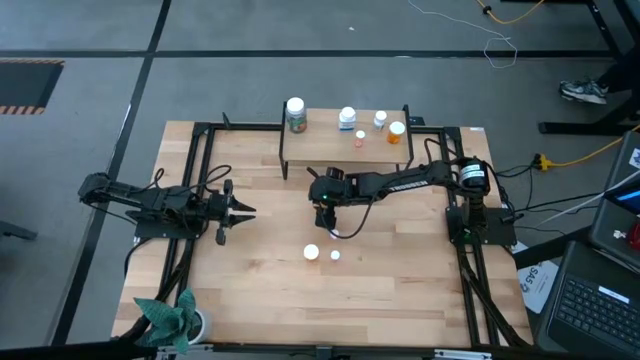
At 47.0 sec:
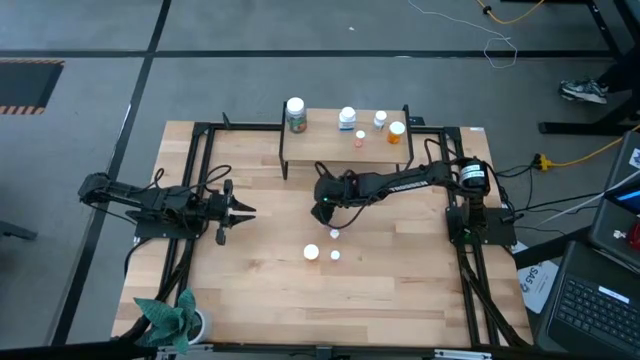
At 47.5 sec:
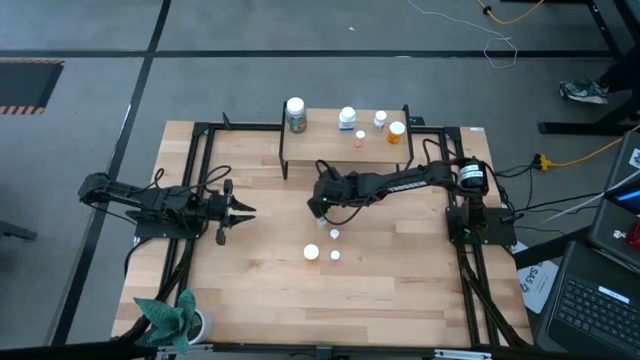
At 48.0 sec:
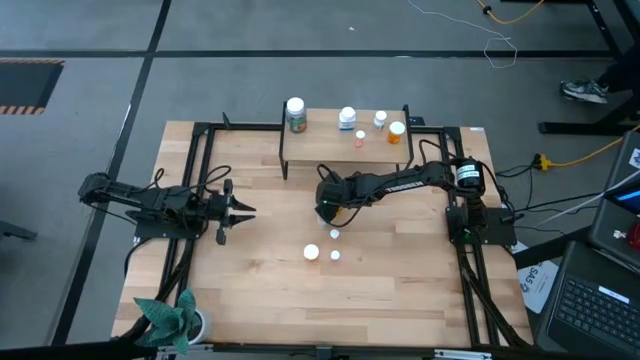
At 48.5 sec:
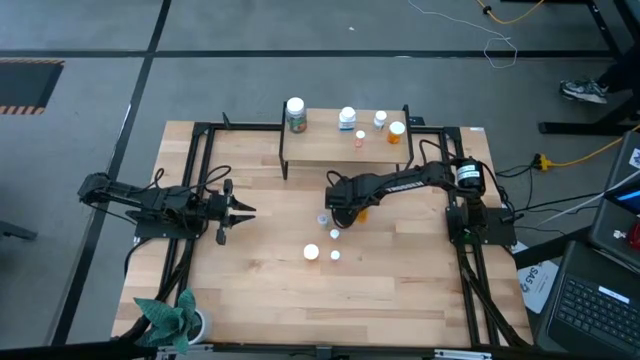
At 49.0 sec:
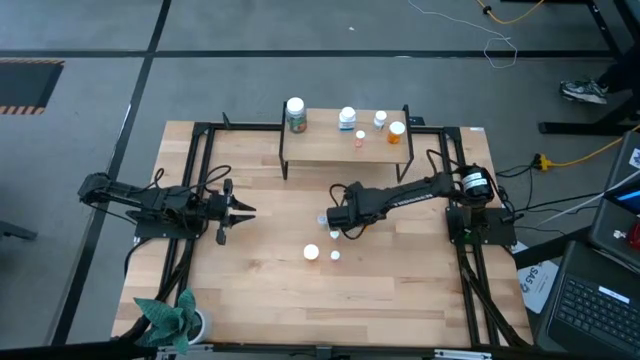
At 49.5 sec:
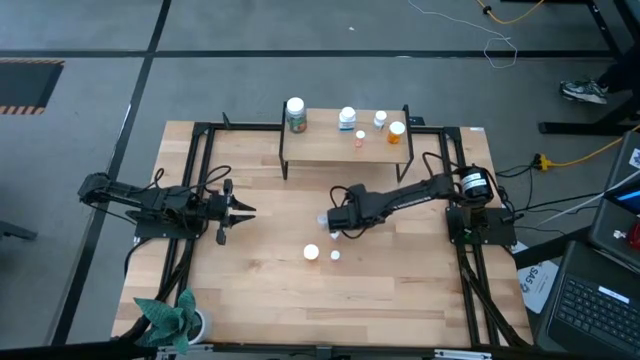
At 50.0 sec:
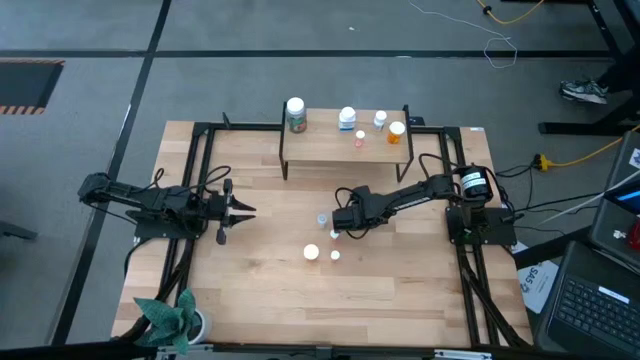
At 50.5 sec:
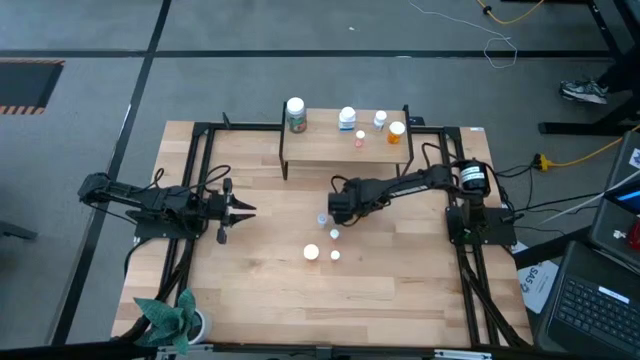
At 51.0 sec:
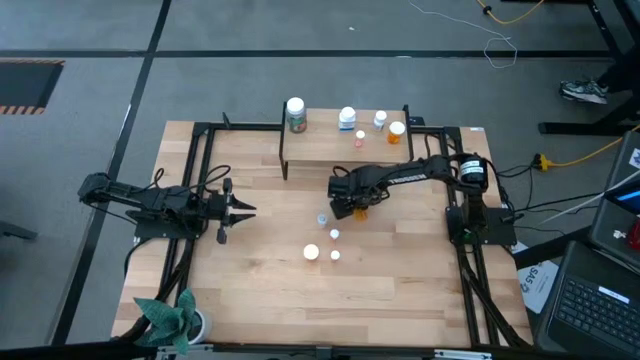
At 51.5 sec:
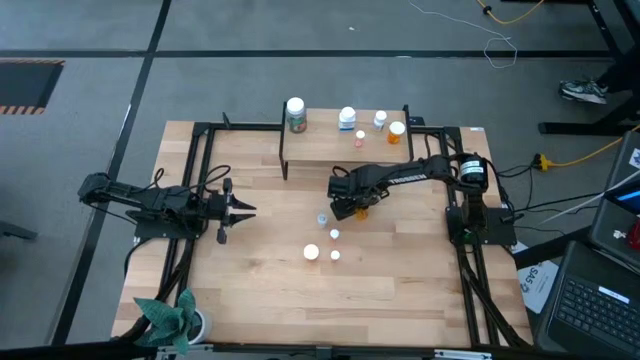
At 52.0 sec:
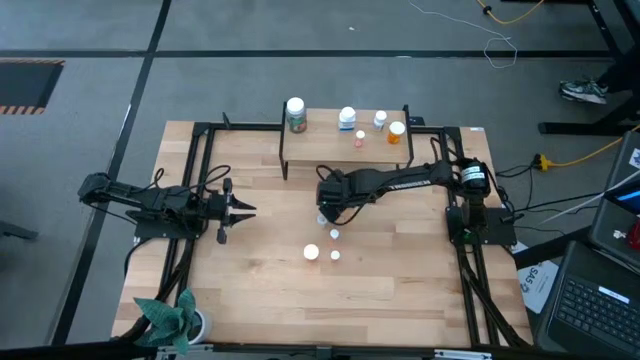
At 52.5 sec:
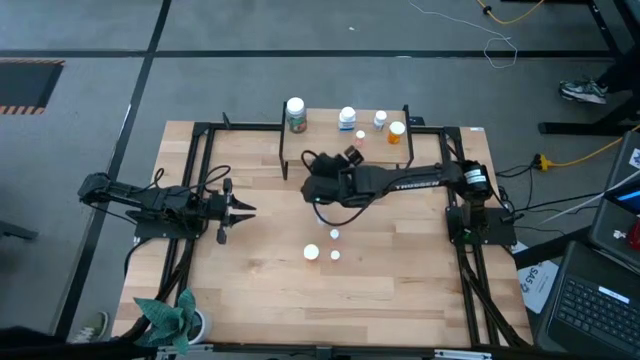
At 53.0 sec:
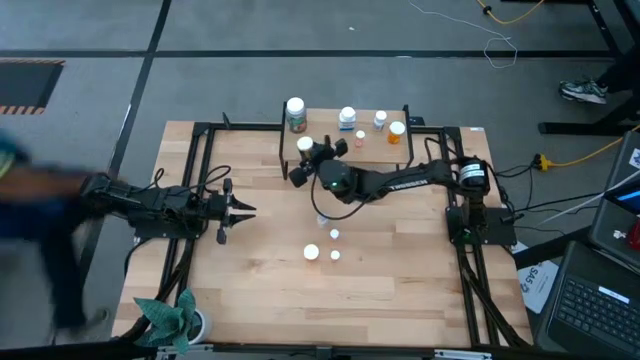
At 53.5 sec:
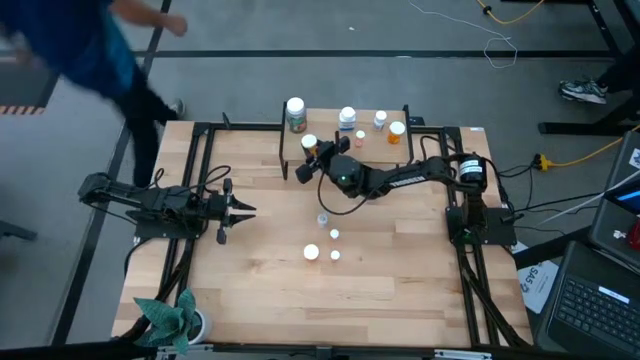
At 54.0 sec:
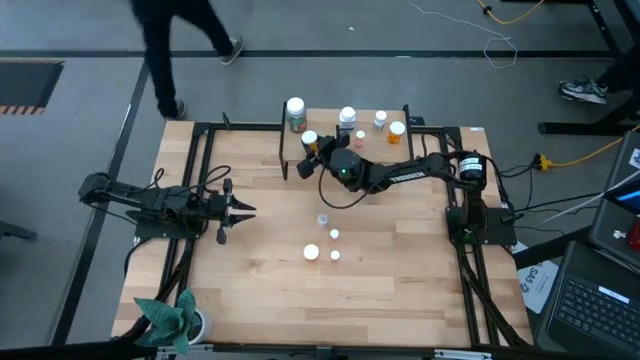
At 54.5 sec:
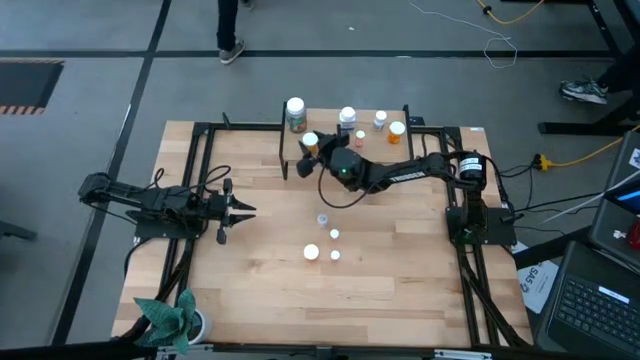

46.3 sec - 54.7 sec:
Task: Pick and place medicine bottles onto shelf by color
Put the top orange pill bottle on the shelf

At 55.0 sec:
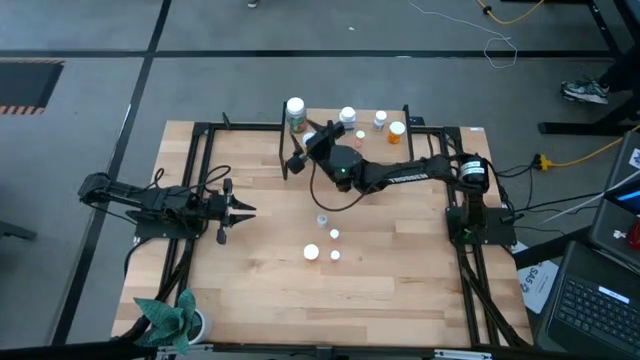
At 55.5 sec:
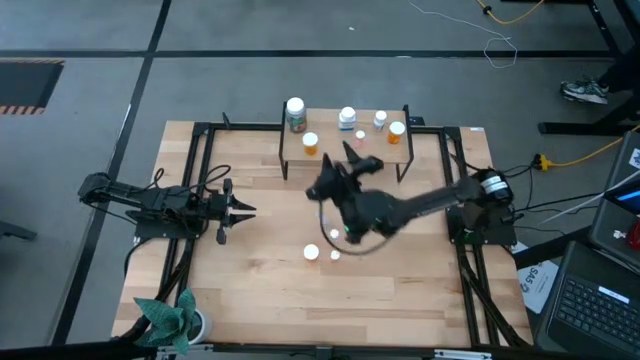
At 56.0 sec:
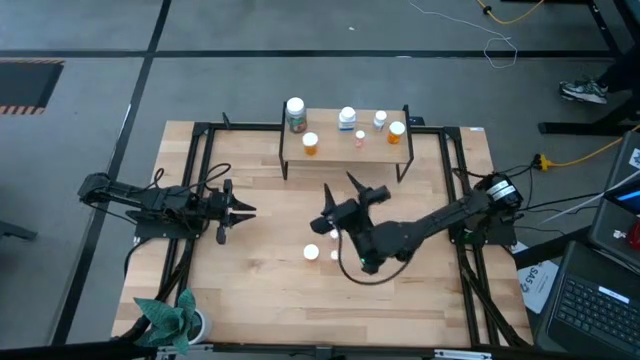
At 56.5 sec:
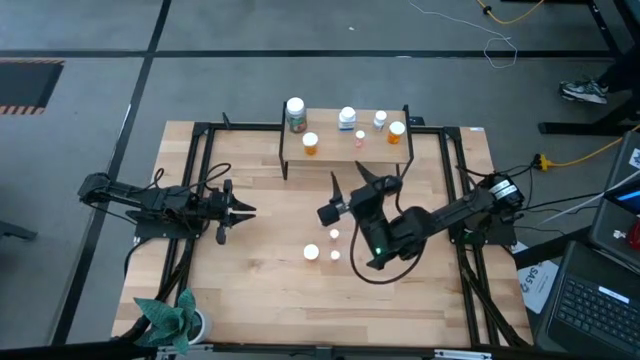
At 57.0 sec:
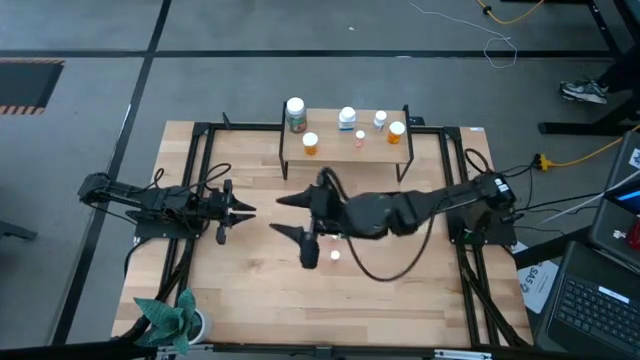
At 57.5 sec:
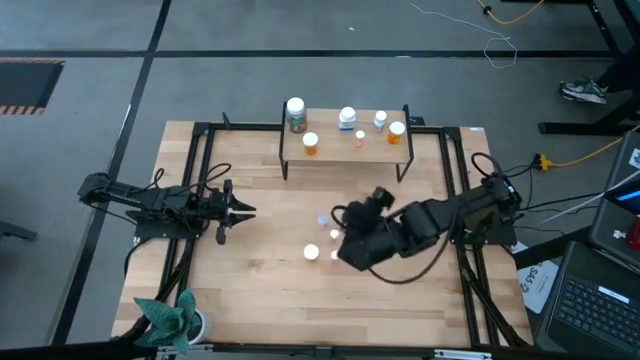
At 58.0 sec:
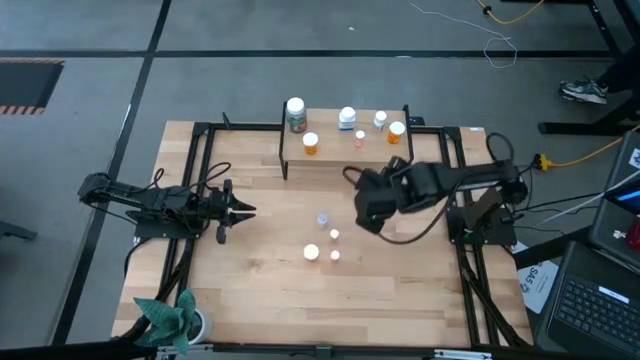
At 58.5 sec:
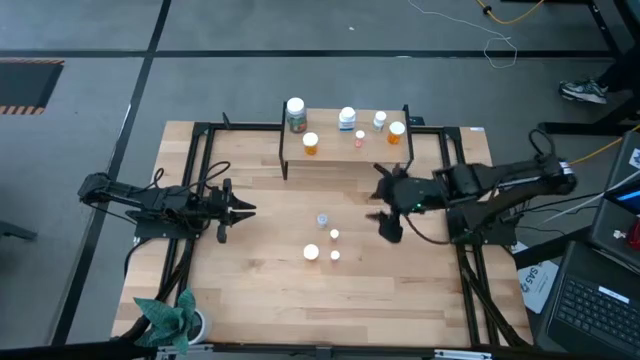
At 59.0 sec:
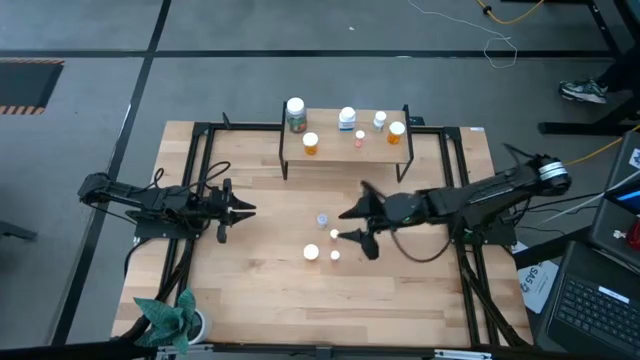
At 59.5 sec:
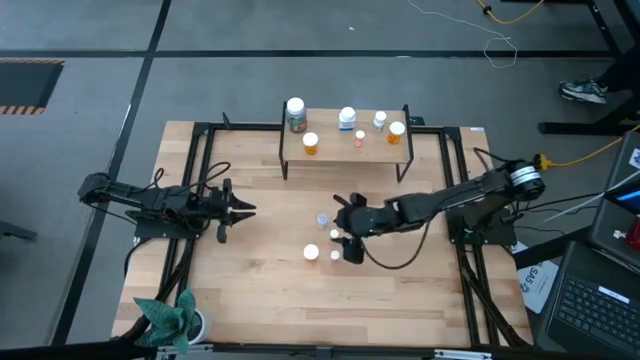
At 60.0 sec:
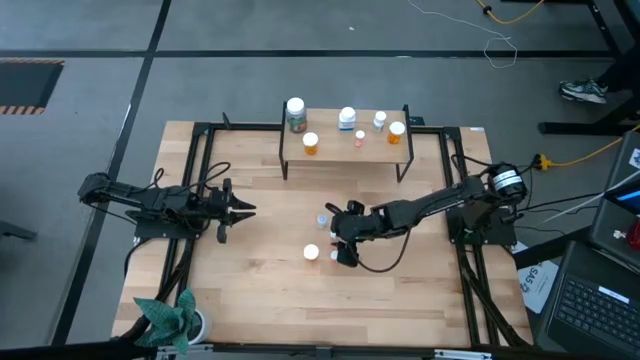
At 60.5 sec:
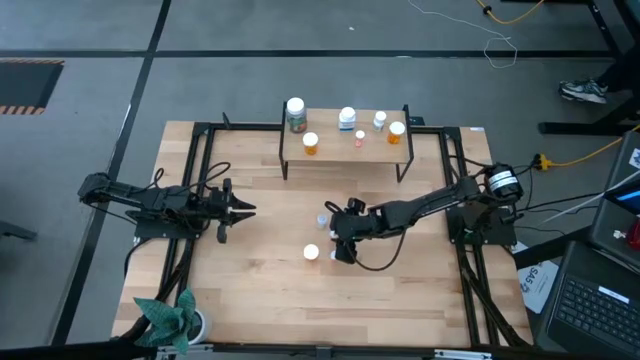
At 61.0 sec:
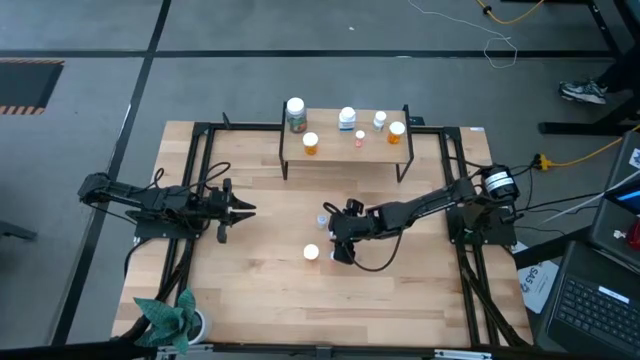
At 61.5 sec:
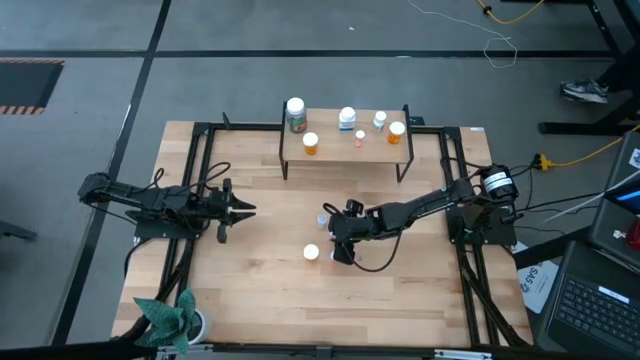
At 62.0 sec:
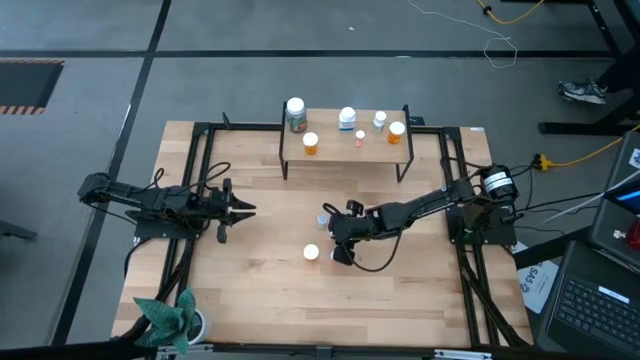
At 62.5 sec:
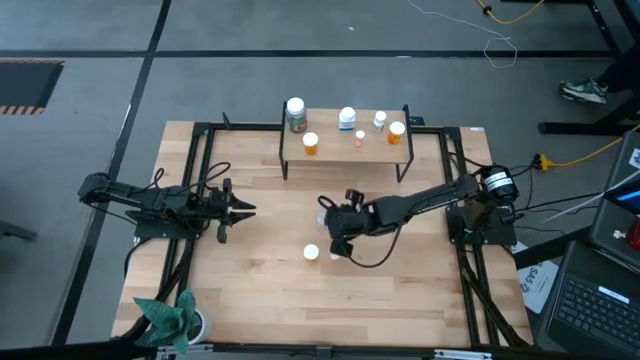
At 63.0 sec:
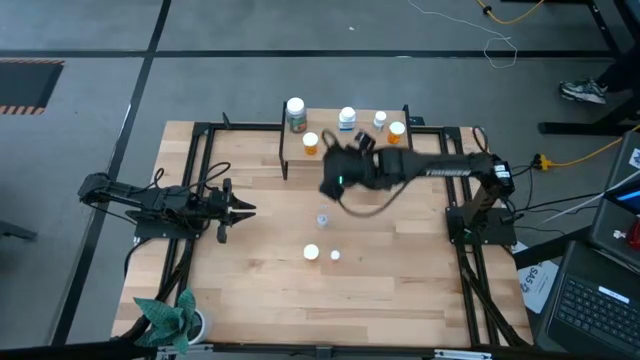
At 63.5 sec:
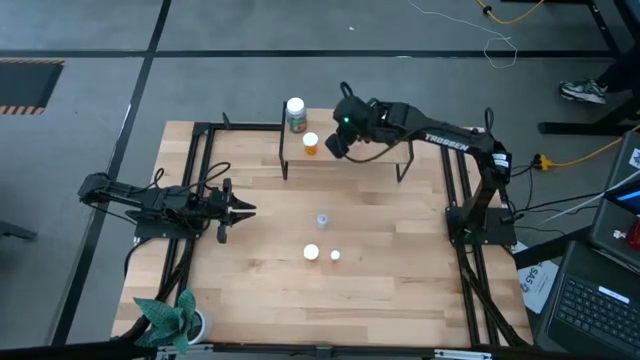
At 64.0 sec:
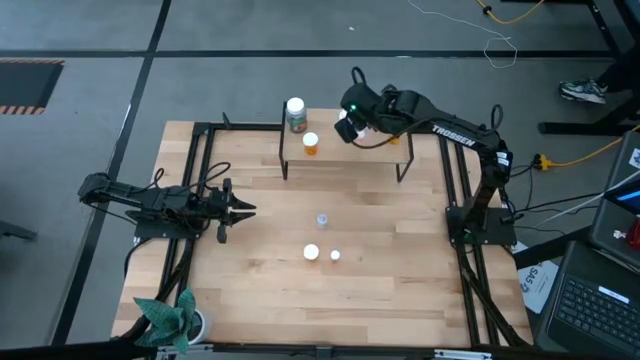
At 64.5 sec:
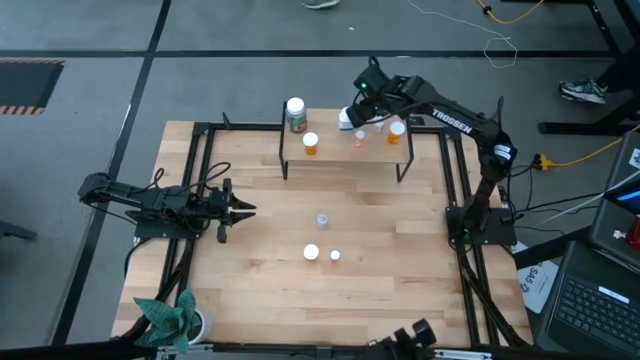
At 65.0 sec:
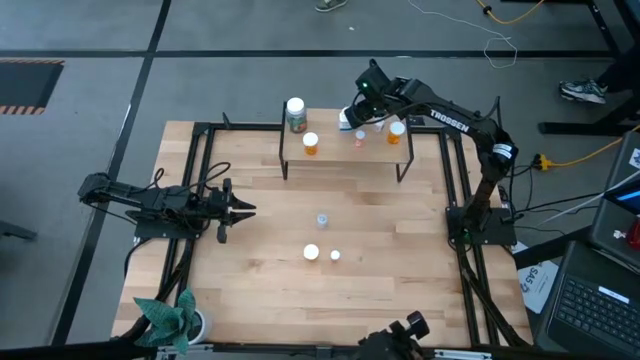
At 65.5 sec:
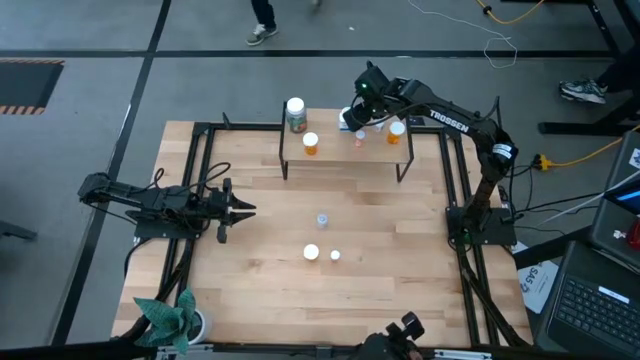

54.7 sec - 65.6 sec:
Put the top red pill bottle on the shelf aligned with the other red pill bottle

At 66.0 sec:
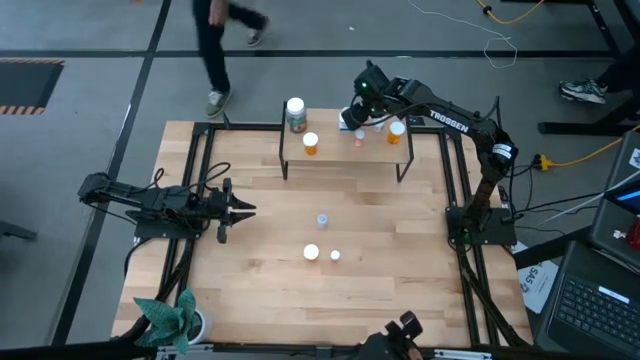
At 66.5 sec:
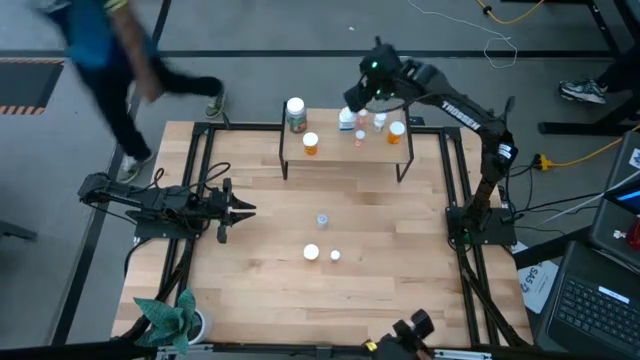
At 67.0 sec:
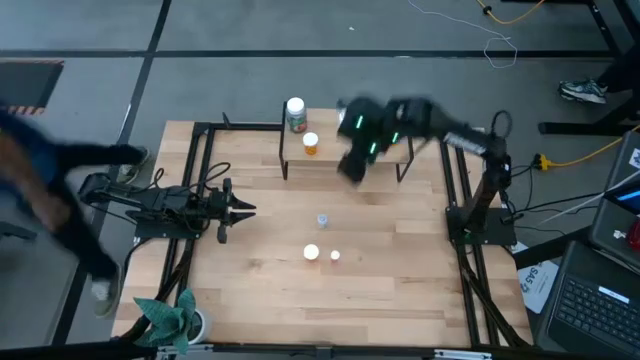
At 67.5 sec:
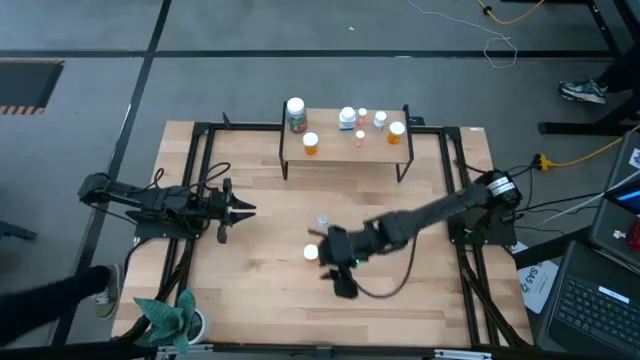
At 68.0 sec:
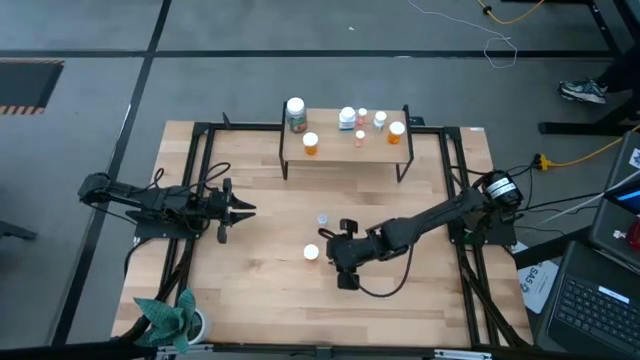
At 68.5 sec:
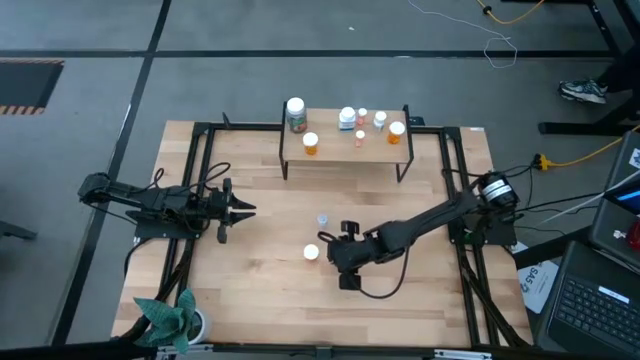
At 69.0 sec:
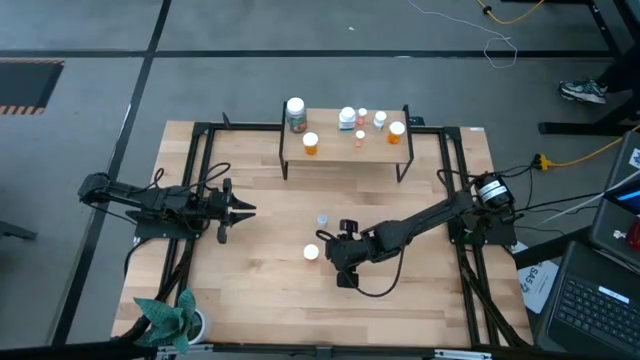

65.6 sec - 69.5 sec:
Put the red pill bottle on the shelf
